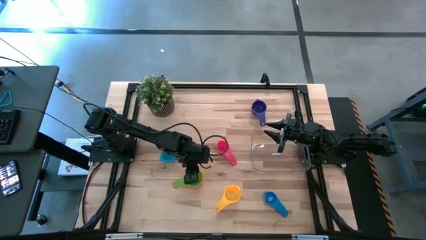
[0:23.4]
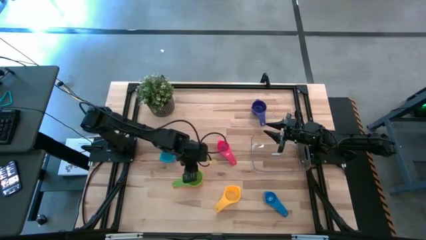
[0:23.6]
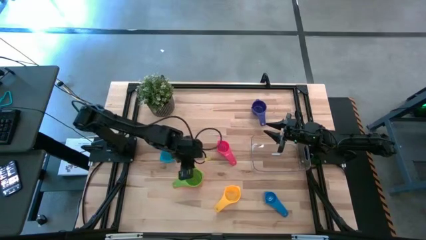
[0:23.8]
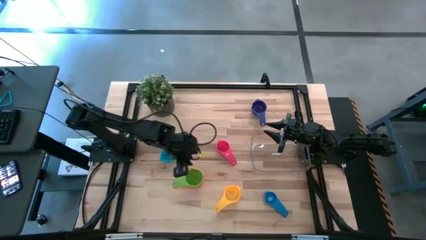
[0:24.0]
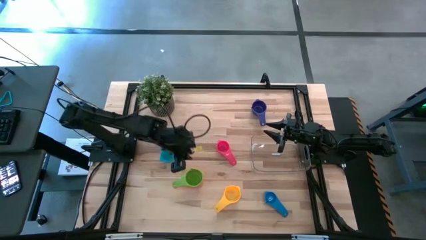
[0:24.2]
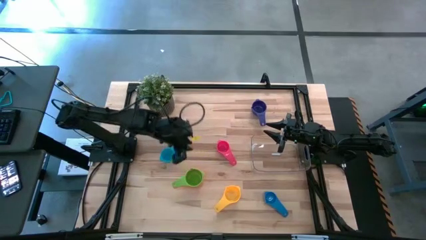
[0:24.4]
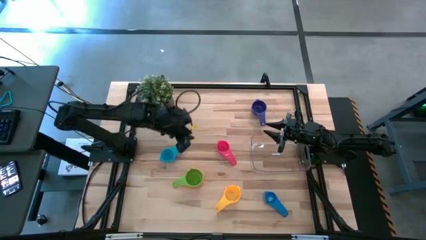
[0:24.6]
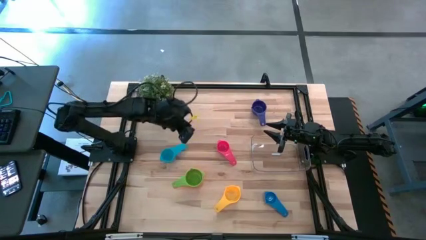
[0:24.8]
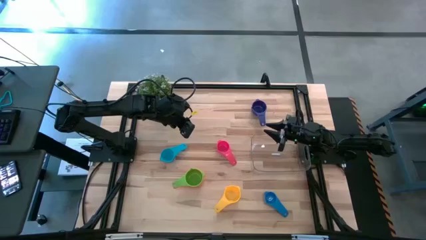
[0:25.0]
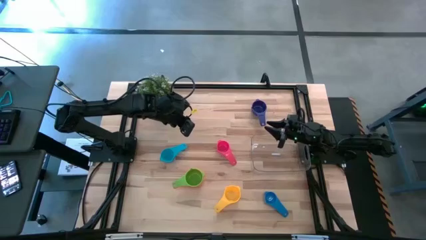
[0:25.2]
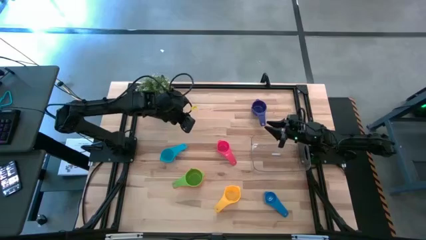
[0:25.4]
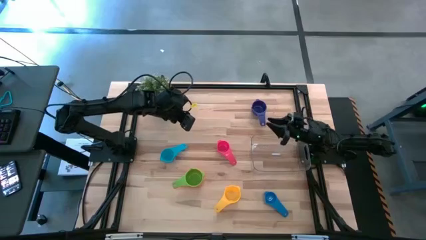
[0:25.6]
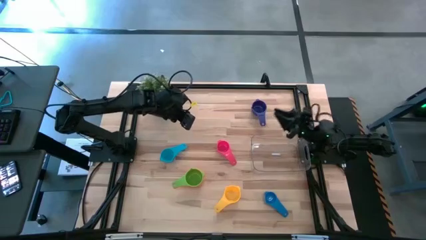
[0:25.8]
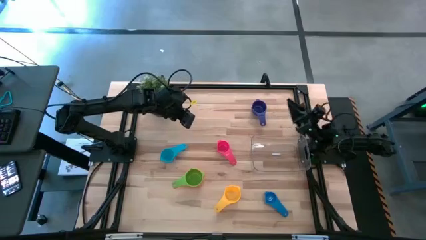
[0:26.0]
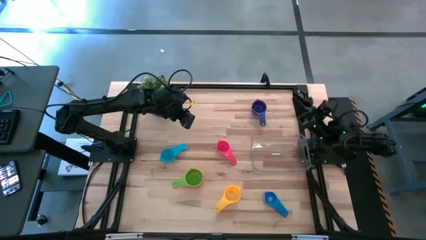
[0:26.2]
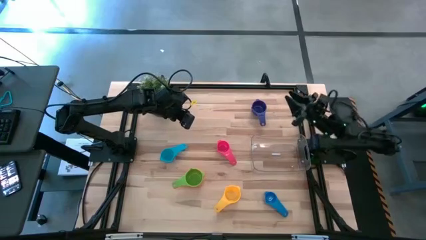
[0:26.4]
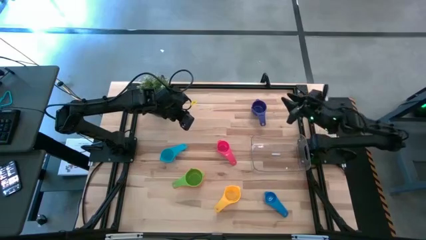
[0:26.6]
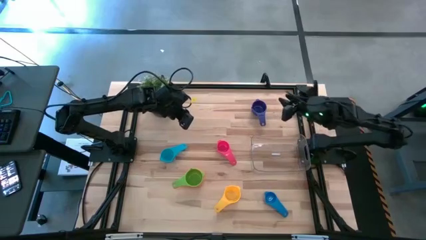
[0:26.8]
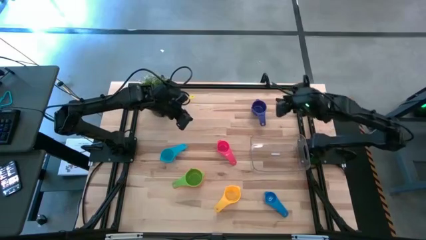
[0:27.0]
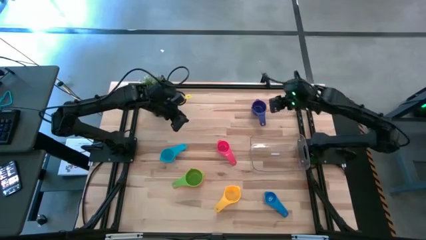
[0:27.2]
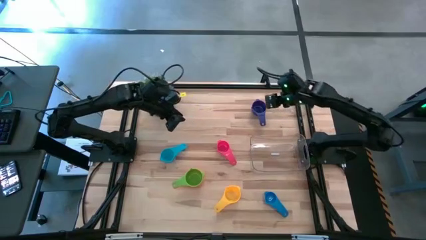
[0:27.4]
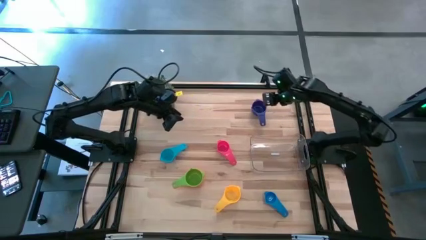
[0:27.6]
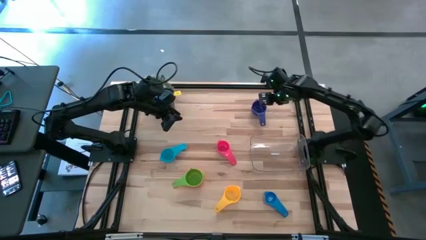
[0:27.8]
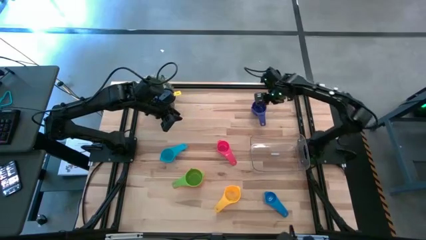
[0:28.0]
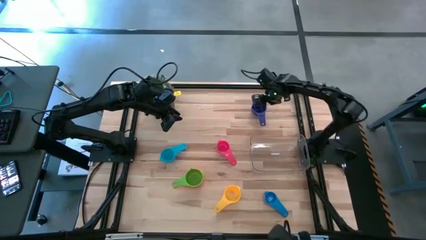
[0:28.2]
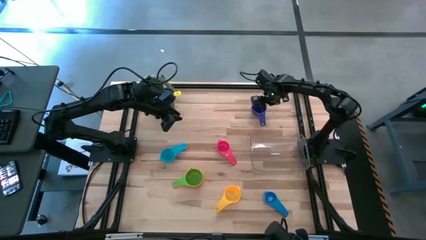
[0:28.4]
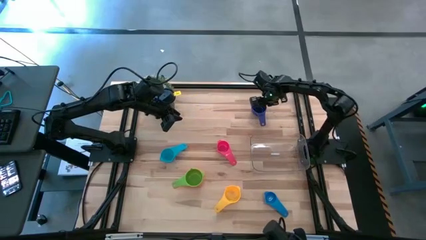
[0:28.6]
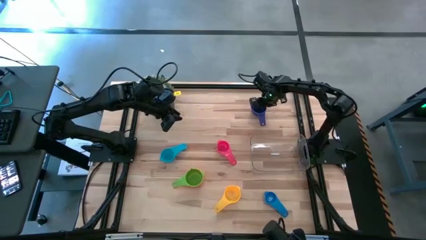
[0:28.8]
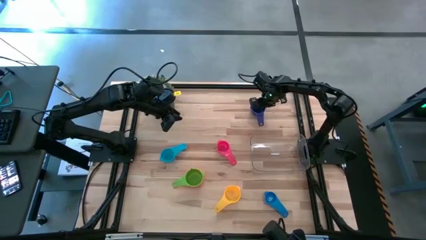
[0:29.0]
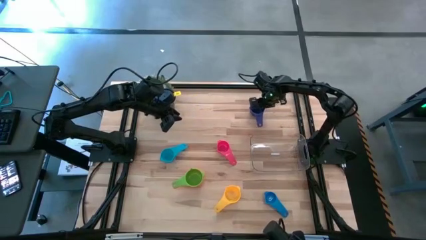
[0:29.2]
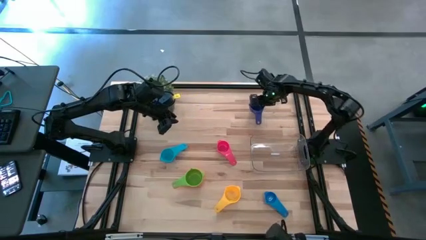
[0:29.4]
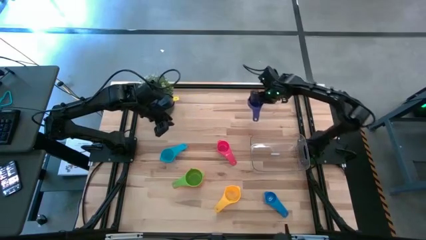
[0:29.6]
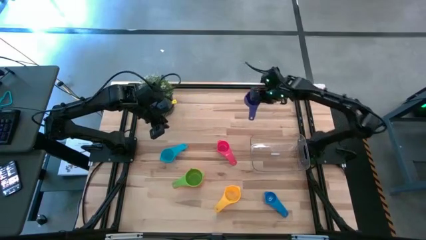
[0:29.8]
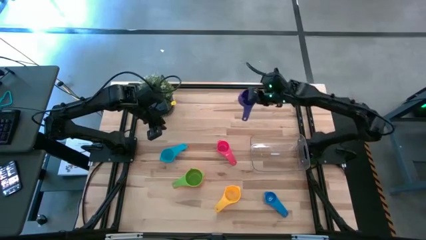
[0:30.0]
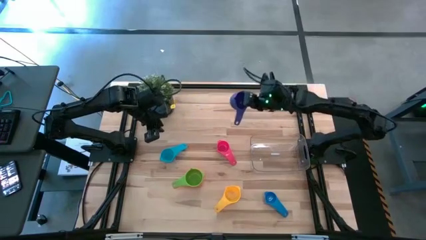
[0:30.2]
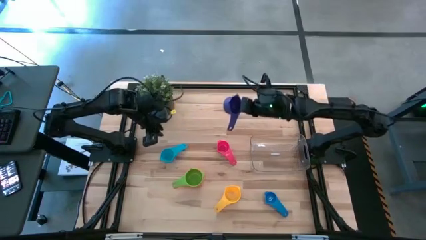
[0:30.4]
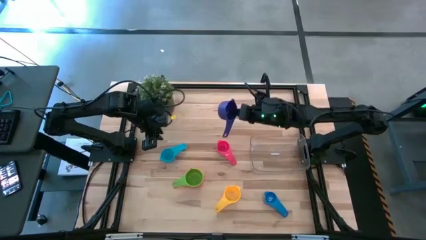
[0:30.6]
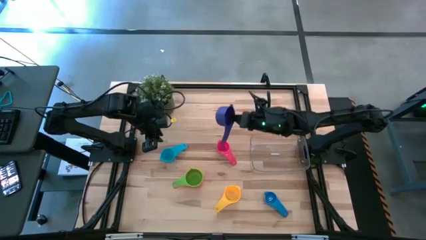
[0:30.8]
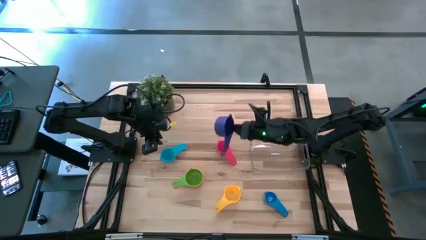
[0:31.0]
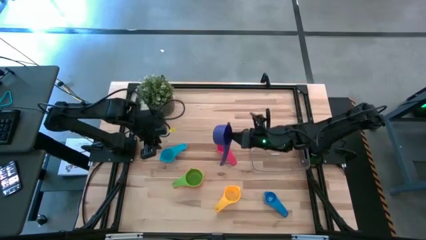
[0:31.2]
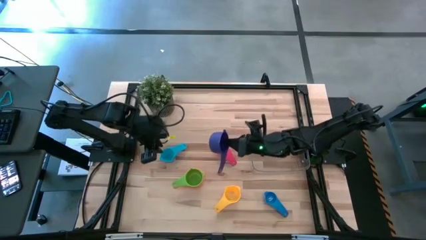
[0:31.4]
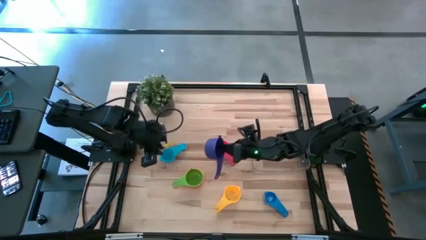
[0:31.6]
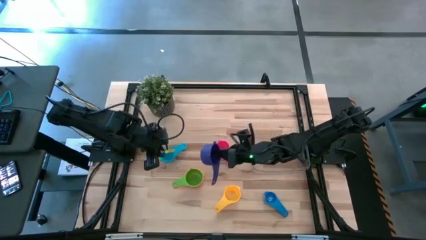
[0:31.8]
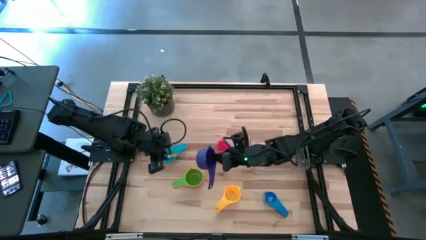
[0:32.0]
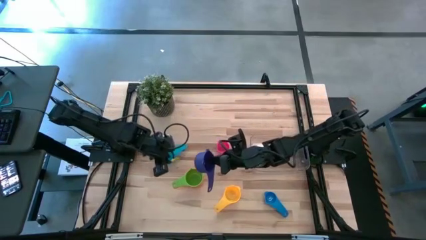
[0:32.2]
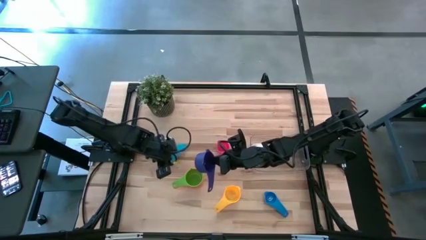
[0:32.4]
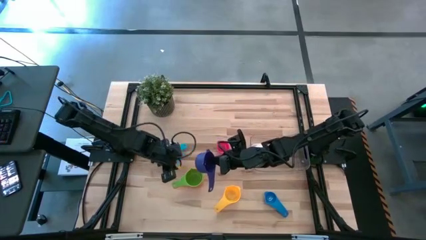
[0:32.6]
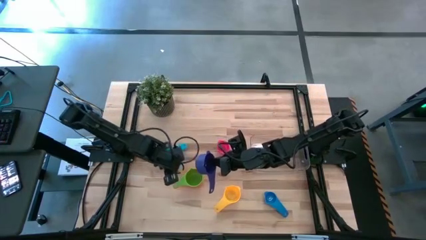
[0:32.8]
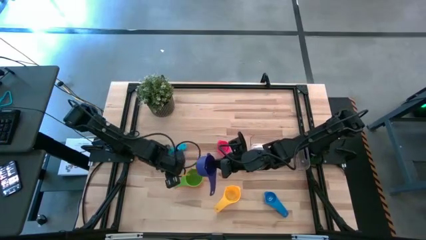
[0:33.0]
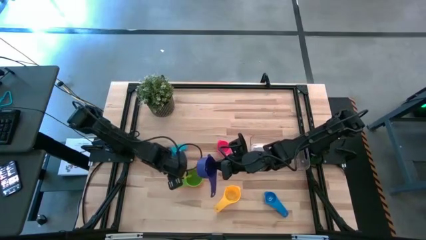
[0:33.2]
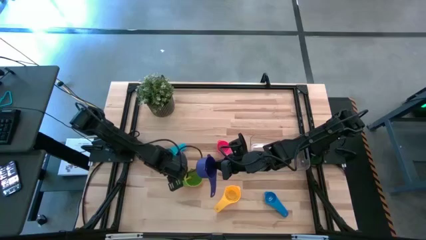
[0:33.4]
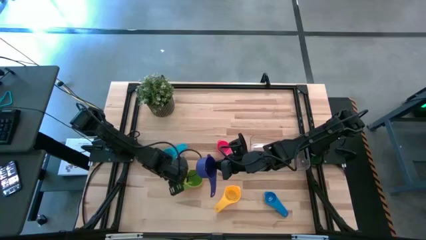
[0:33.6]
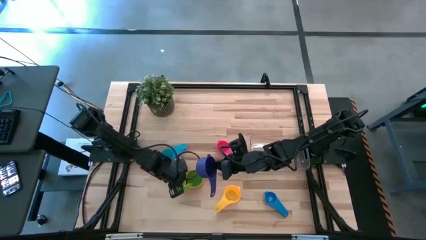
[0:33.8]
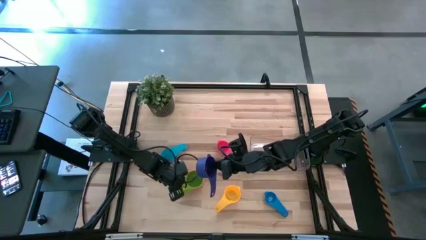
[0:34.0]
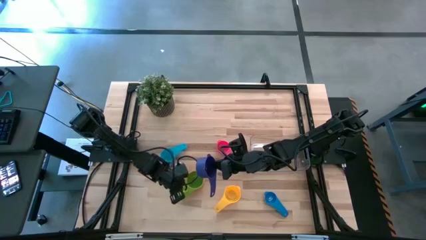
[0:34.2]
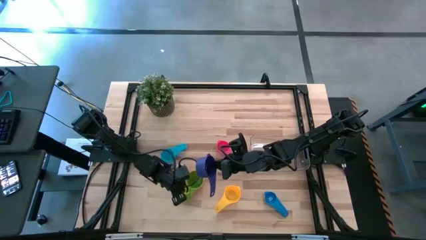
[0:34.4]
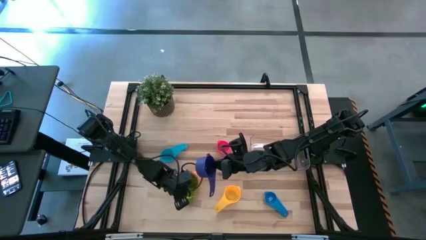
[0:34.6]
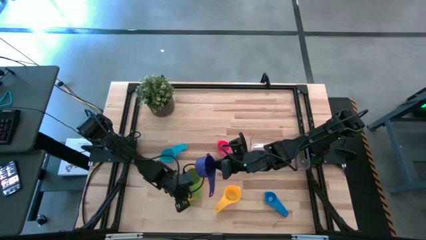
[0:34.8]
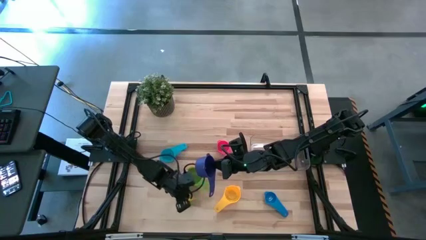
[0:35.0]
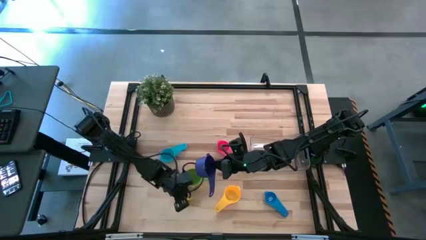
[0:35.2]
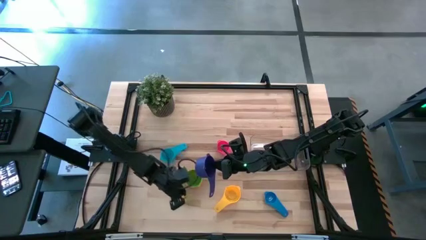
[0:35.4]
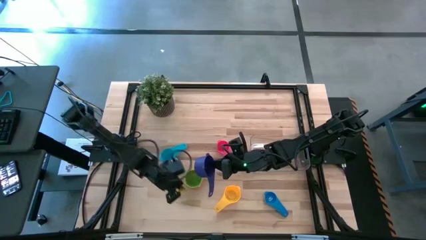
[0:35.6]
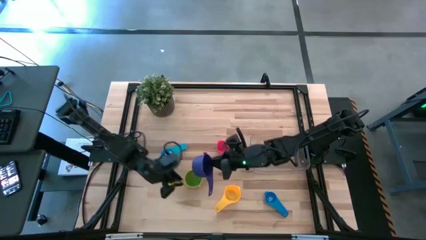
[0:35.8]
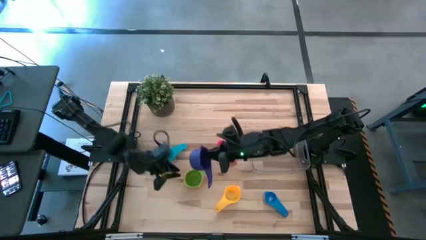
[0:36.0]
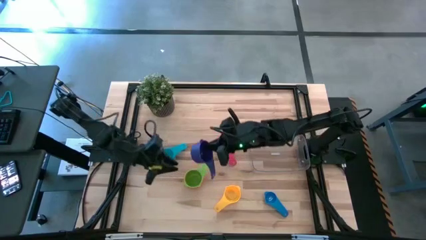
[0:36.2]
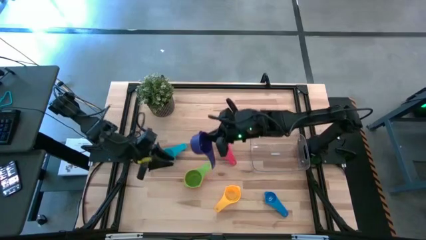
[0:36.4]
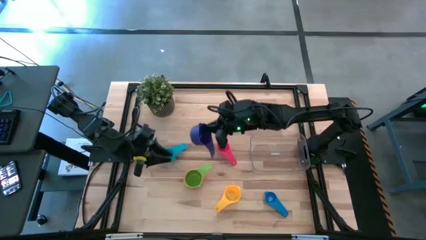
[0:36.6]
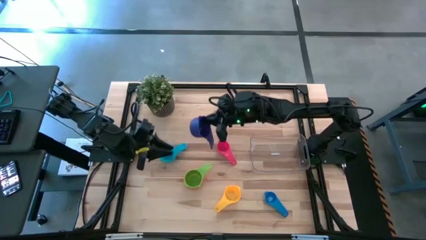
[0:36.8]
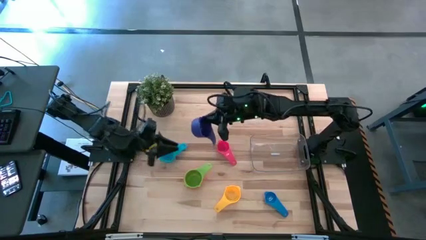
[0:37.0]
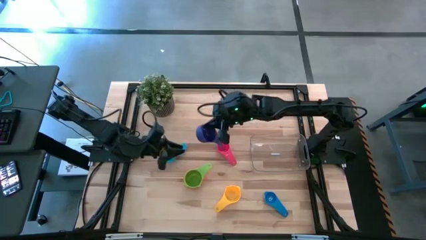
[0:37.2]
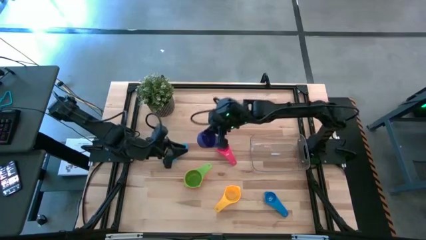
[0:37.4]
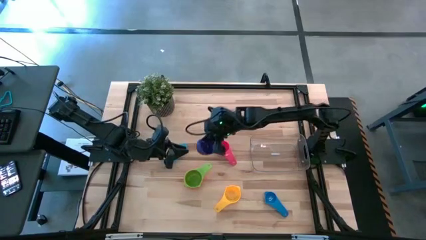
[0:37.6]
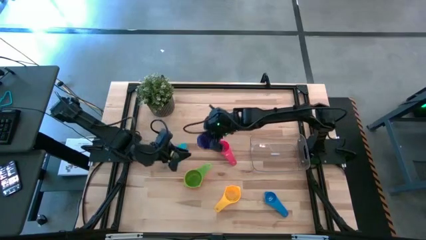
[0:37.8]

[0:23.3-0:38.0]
Task: Nest measuring cups in basket
Stack the purple measuring cup on top of the green measuring cup

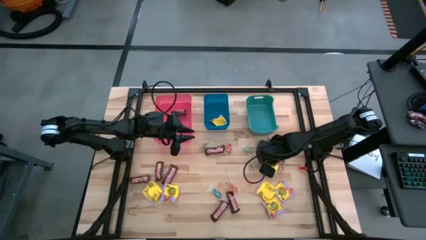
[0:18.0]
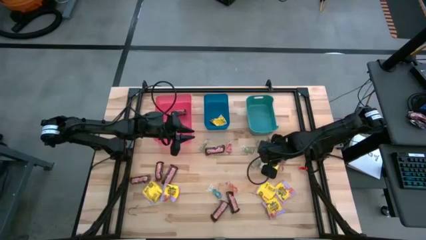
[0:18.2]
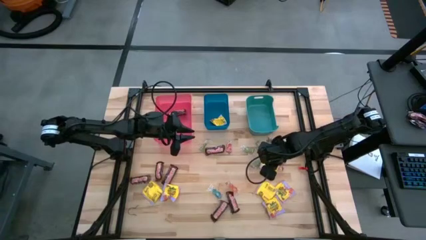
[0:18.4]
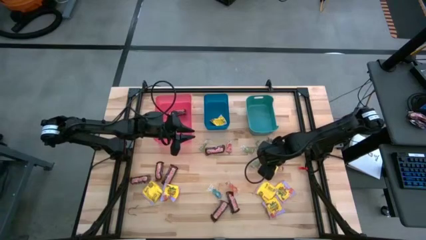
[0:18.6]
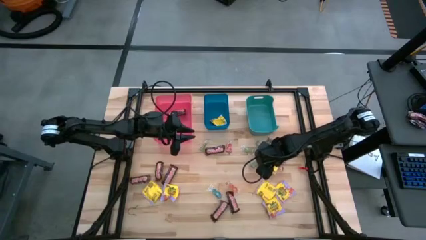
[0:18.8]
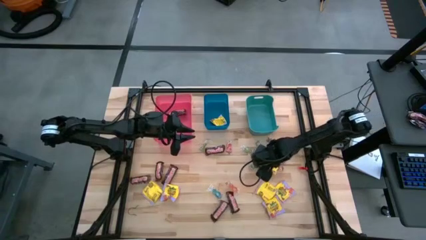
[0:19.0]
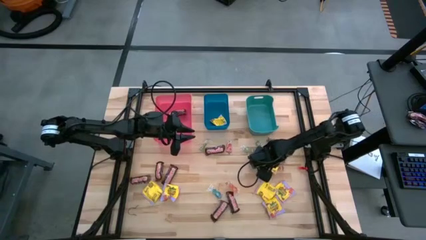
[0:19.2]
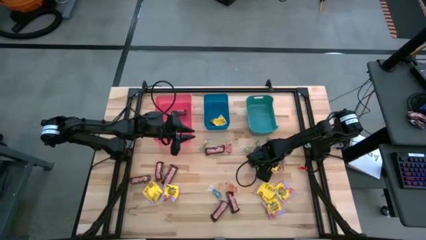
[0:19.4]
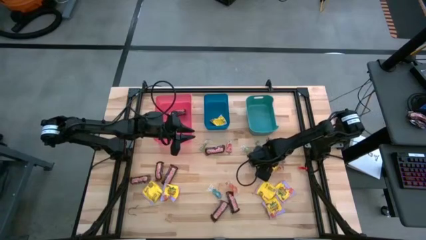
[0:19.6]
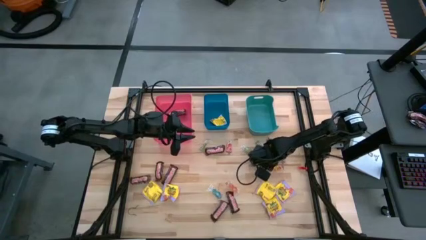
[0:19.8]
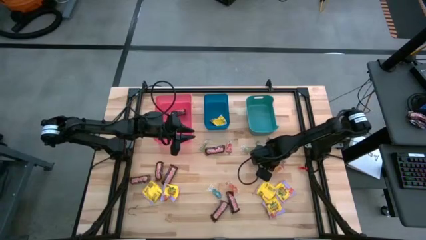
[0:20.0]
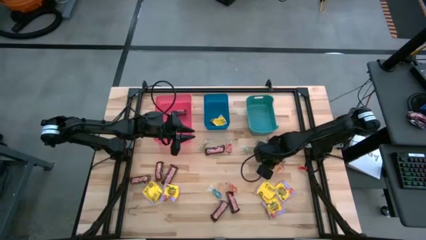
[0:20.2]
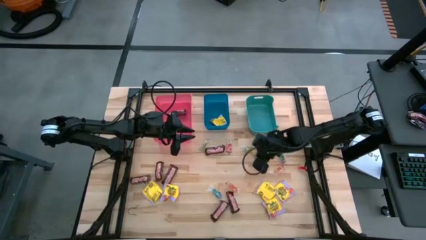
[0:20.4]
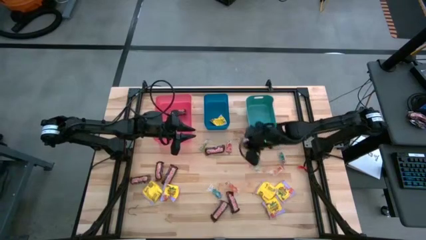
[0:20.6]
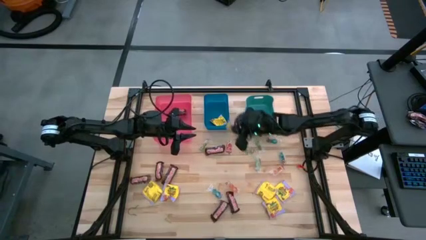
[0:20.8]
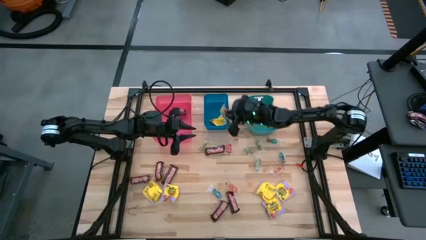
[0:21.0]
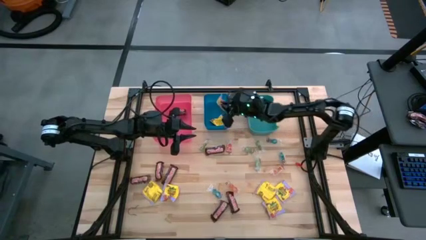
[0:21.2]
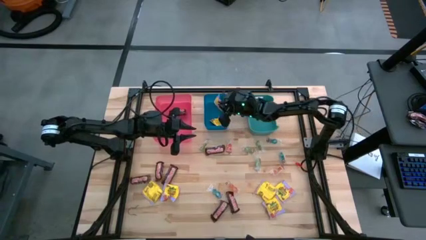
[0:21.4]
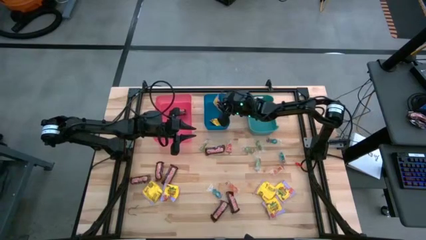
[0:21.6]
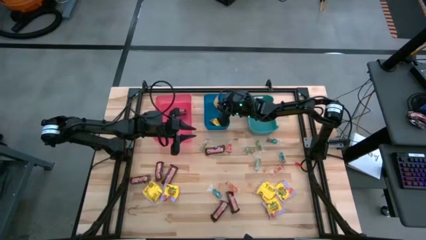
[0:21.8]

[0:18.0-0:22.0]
Task: Sort candy
Put the yellow candy into the blue bin
